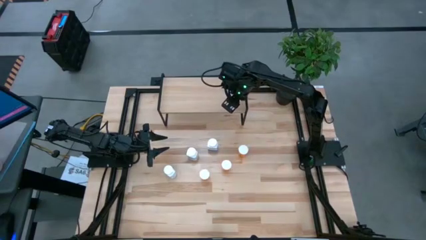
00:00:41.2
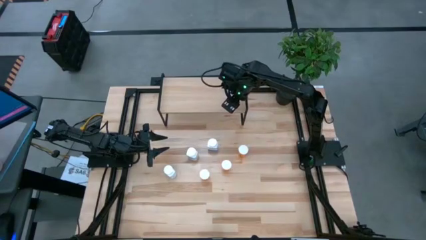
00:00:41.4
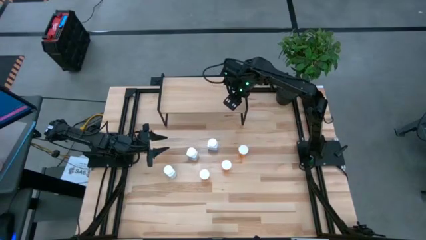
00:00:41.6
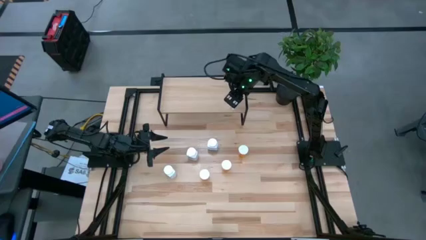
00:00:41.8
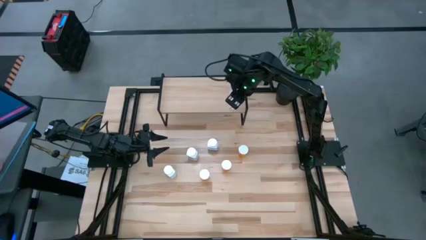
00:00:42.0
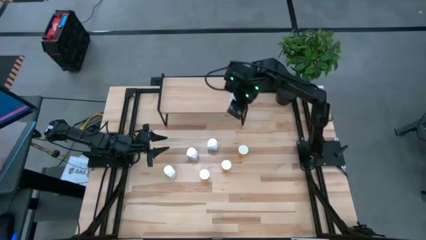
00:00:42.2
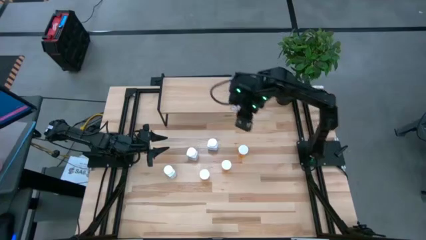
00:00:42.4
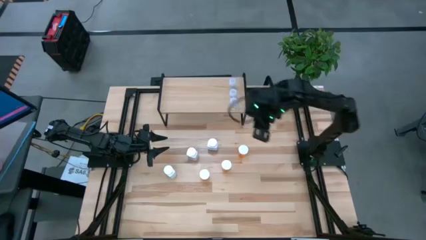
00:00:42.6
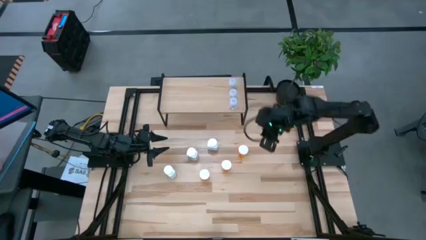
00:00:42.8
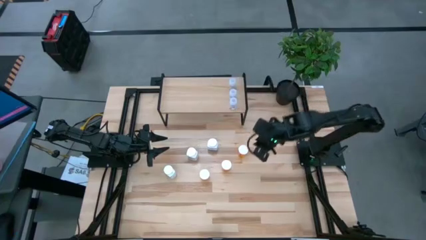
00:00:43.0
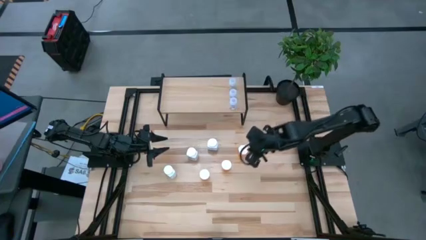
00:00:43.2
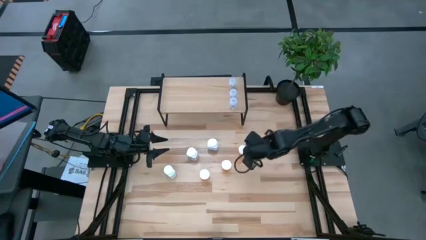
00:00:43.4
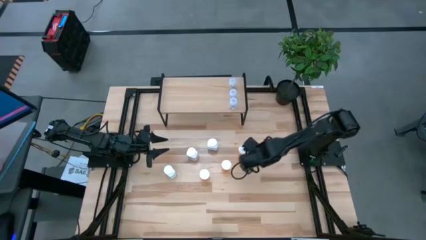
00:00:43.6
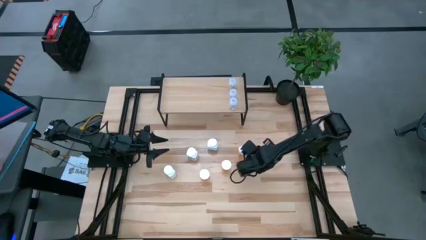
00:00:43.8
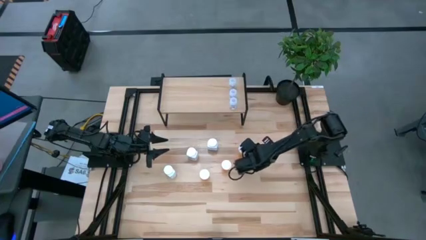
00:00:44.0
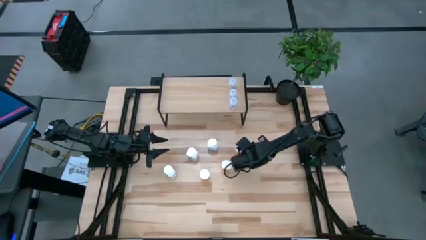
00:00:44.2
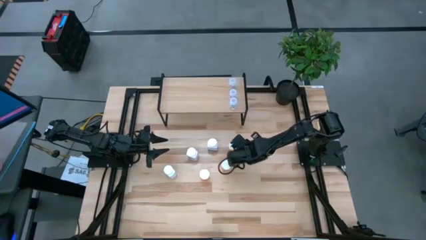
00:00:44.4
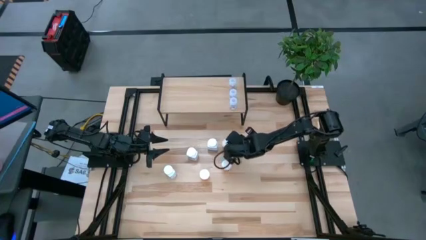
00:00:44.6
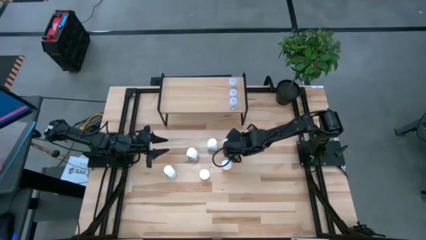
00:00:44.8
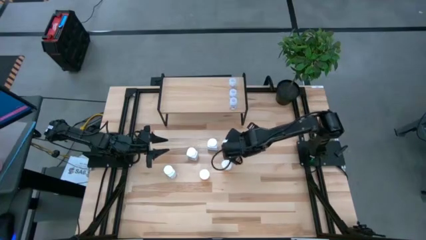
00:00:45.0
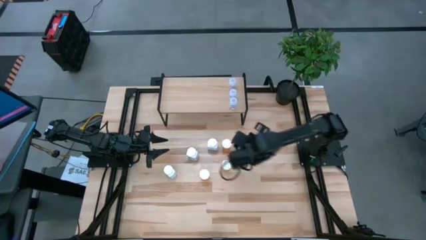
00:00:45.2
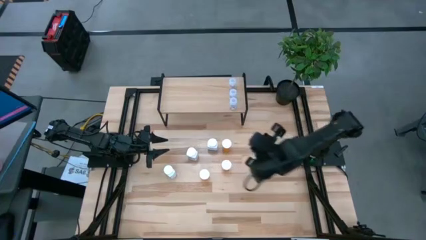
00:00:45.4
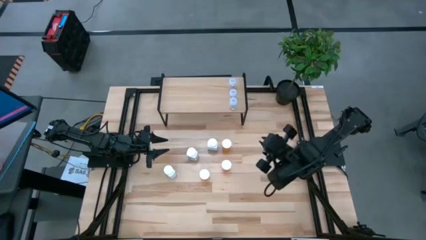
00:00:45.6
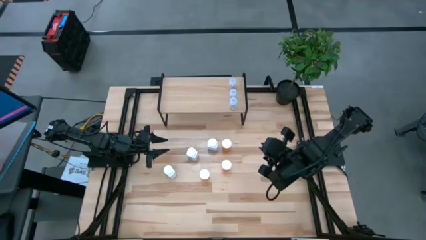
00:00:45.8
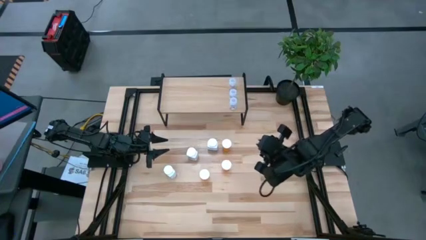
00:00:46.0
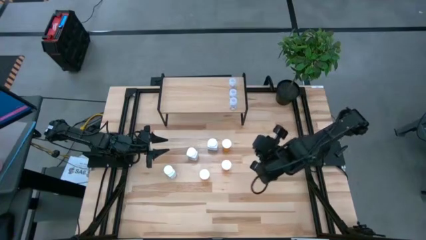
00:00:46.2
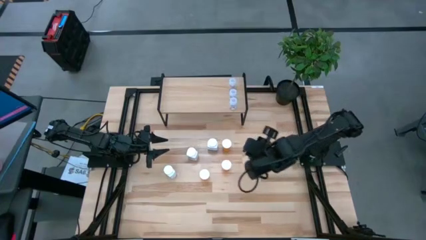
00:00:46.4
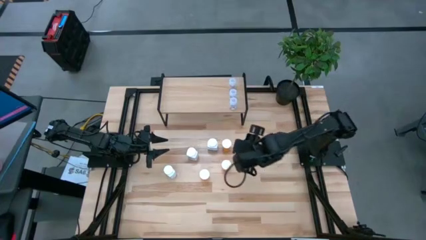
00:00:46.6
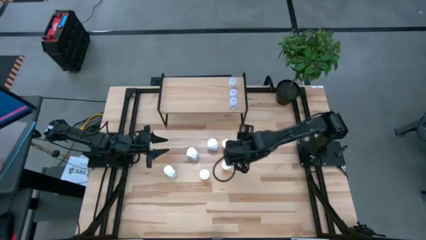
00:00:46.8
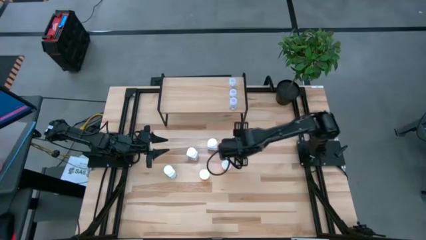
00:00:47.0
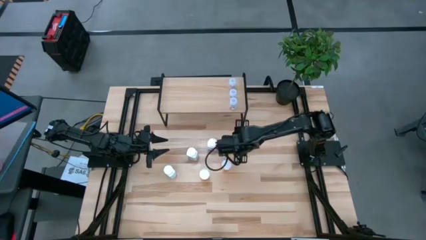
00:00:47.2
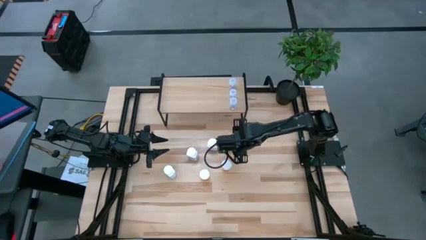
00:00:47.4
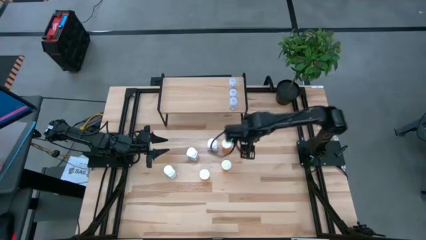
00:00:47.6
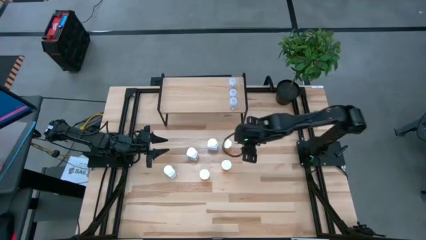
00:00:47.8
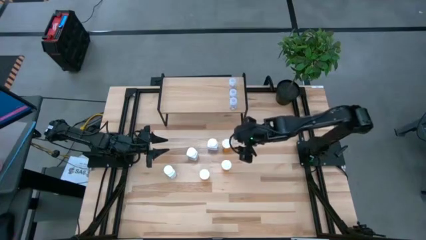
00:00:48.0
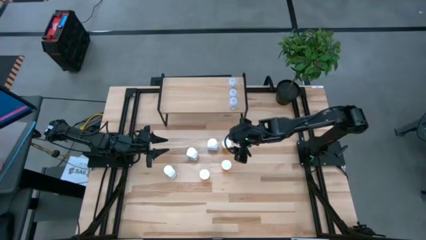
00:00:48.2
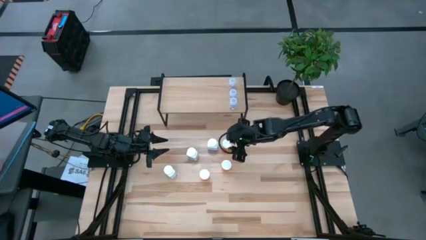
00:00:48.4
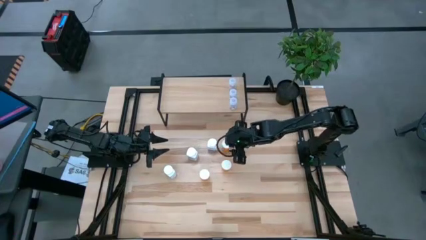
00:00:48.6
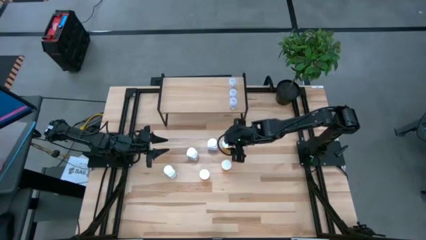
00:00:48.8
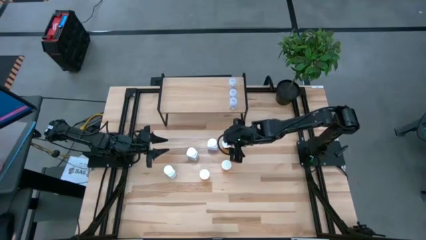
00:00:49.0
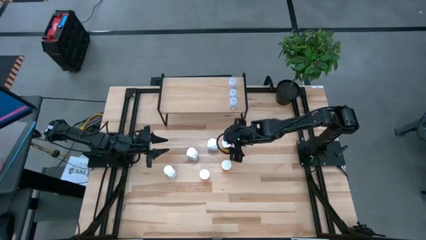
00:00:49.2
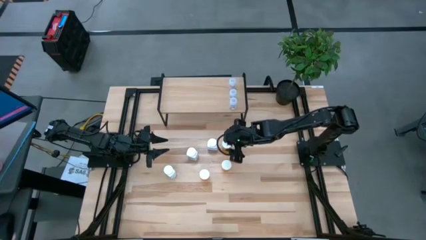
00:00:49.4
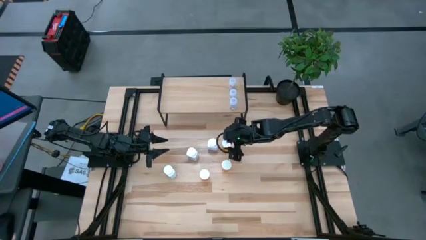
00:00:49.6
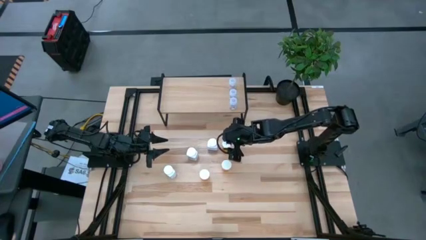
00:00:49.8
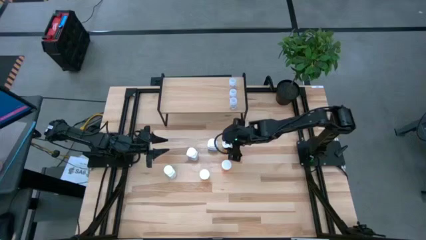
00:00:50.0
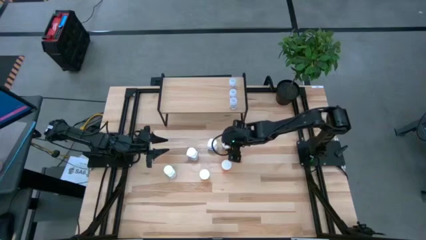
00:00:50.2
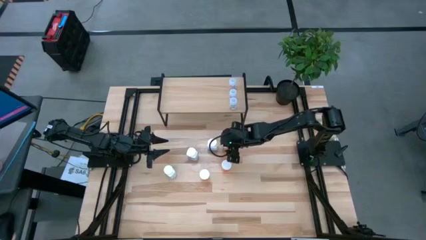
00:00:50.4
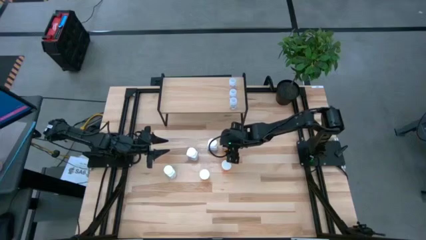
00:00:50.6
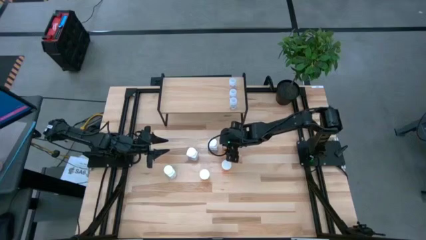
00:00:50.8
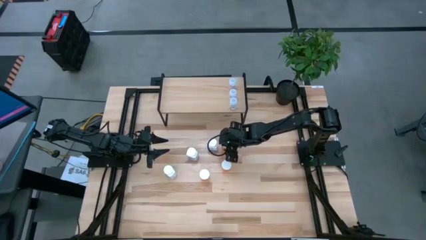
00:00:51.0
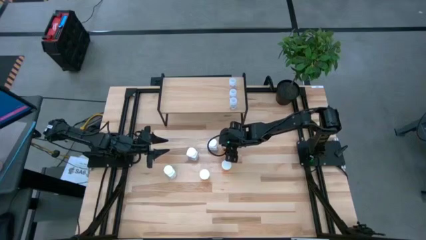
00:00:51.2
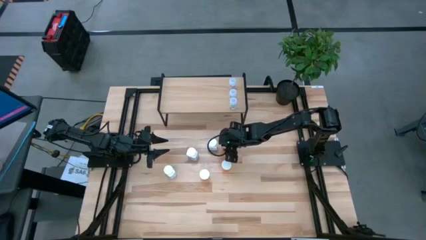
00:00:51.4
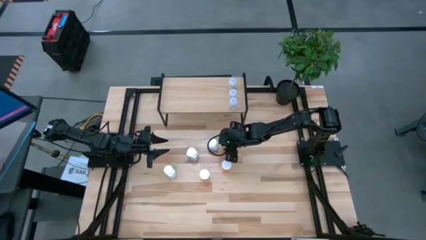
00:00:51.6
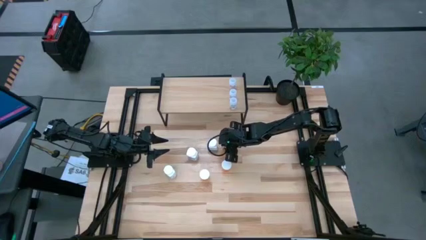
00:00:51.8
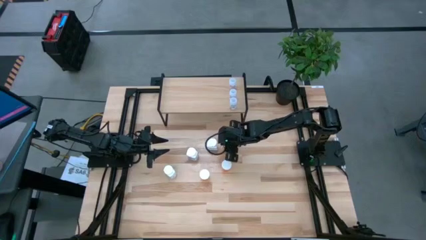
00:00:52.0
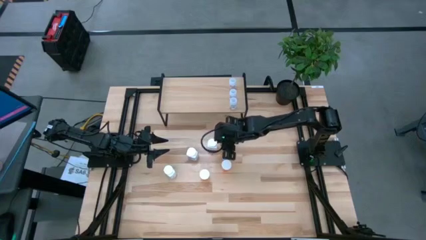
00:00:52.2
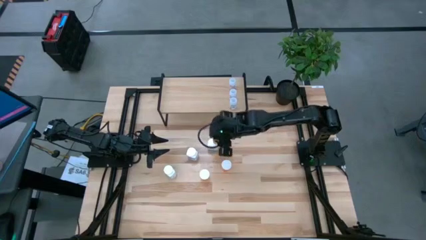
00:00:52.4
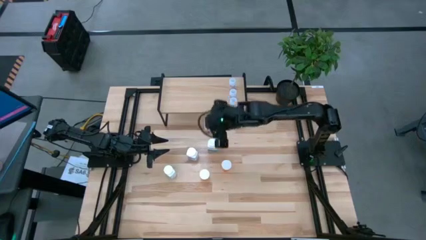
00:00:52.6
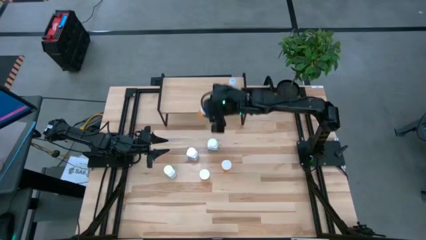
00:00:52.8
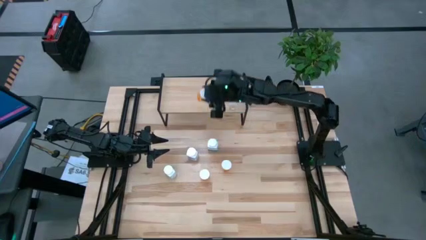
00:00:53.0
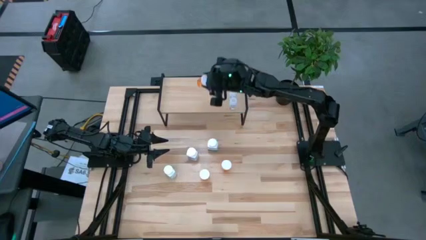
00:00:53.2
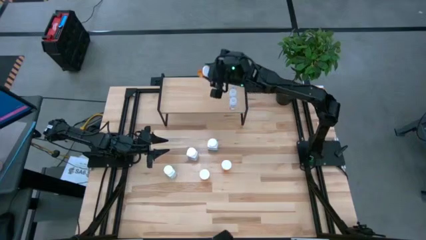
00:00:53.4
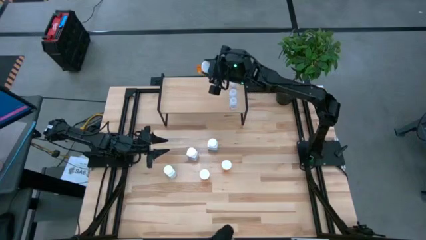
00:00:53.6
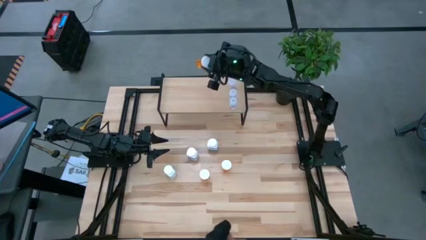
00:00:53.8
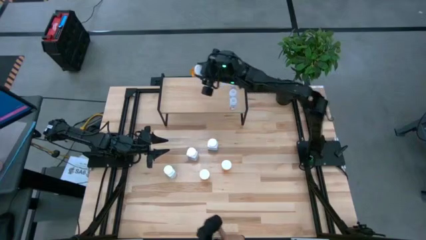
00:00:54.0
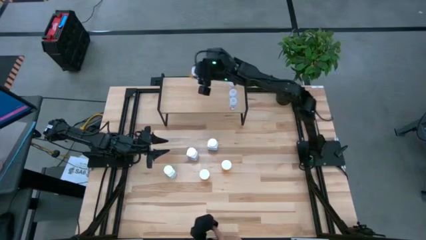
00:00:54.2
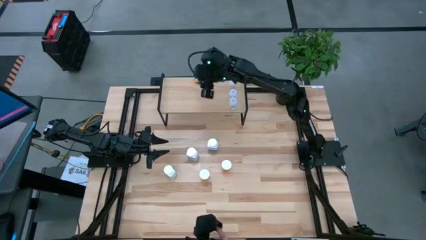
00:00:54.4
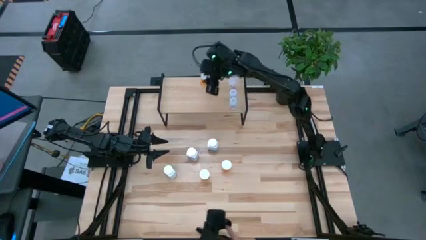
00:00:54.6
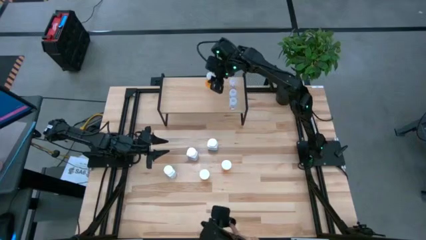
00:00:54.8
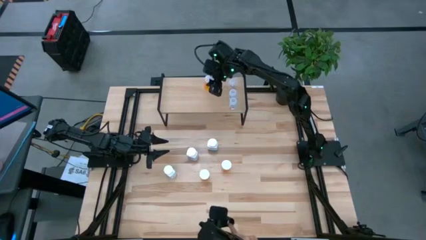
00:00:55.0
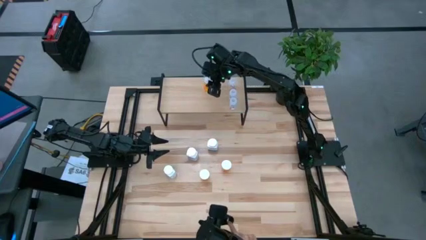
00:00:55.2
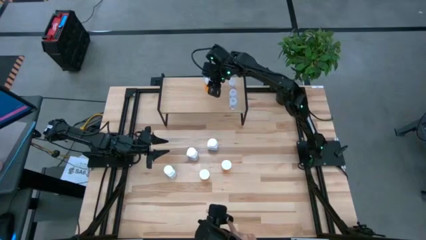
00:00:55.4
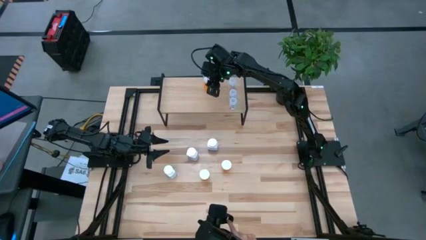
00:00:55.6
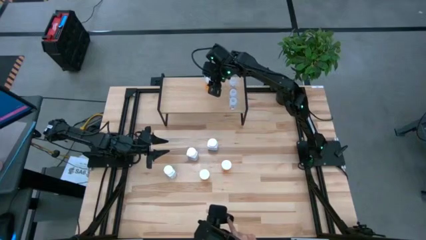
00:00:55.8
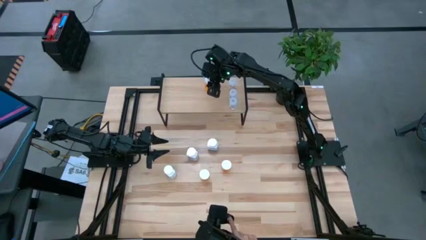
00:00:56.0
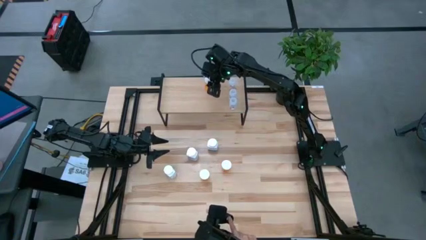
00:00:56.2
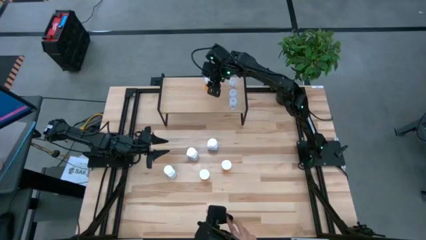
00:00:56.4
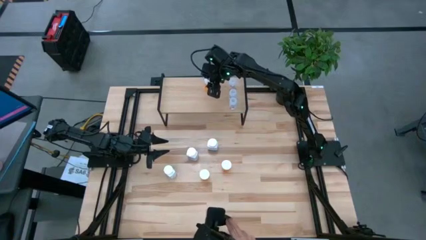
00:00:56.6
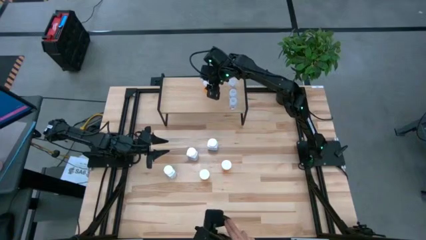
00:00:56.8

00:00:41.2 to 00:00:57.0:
Task: Pick and place medicine bottles onto shelf by color
Put the top orange pill bottle on the shelf

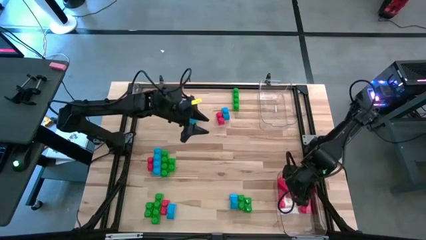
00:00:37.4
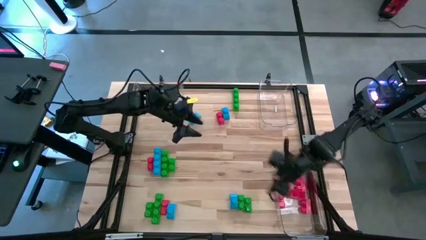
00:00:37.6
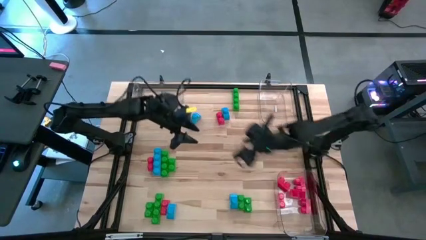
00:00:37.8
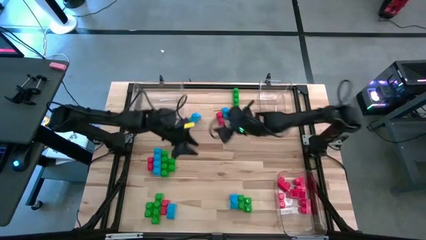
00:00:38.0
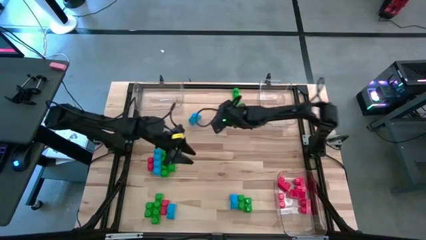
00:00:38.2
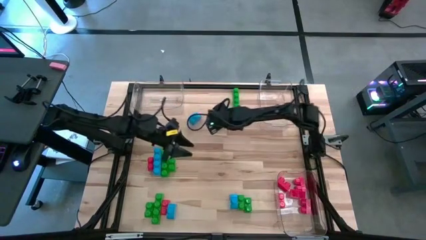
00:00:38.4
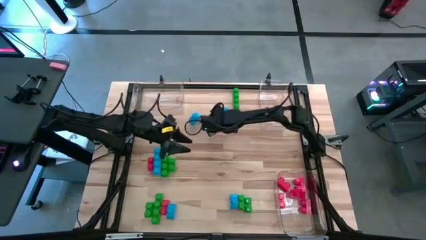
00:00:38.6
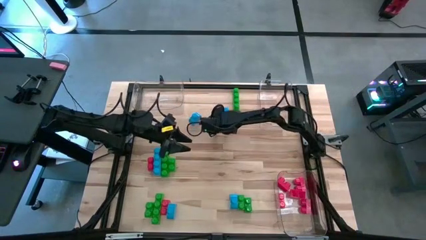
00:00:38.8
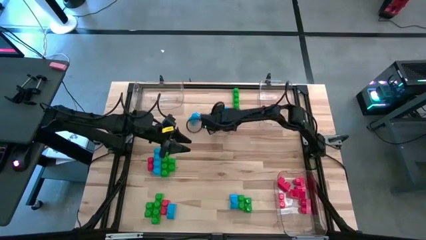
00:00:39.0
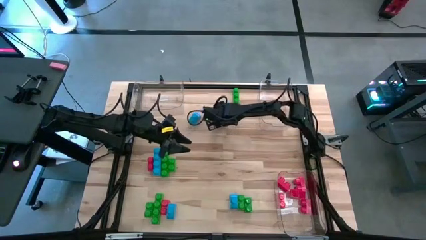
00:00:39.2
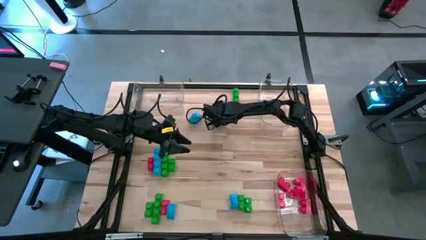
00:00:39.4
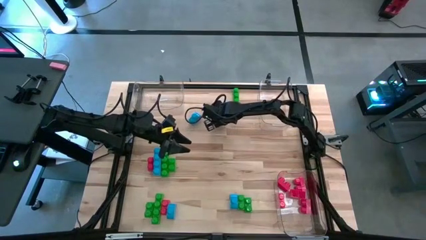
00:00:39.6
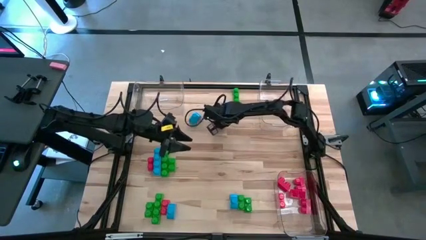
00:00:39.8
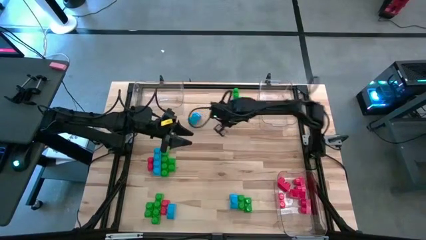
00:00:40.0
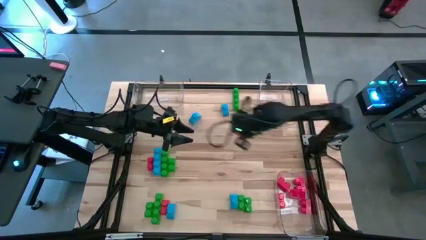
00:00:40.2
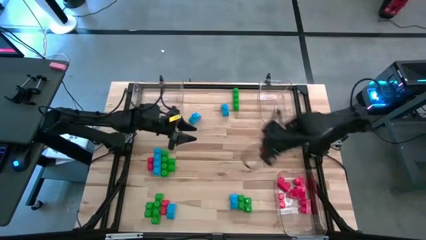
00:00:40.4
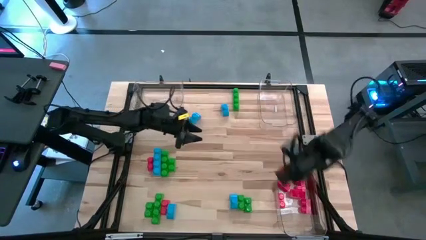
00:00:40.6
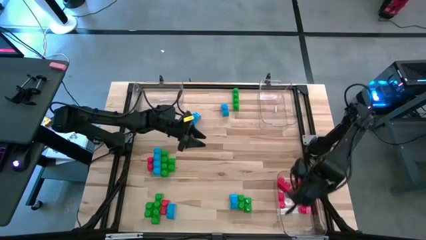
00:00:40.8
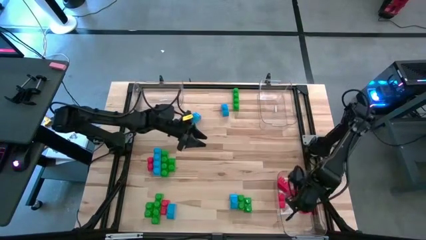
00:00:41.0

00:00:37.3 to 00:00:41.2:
Task: Sort blocks
Put the red game piece into the bottom right transparent bin
